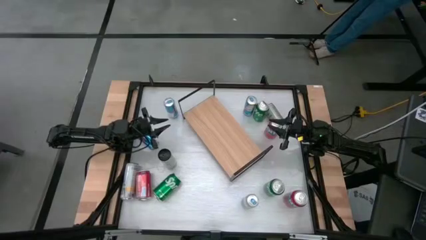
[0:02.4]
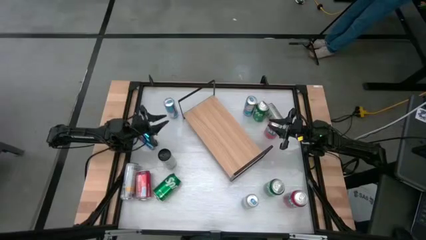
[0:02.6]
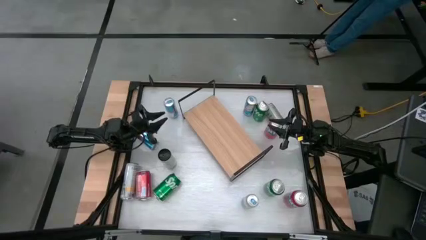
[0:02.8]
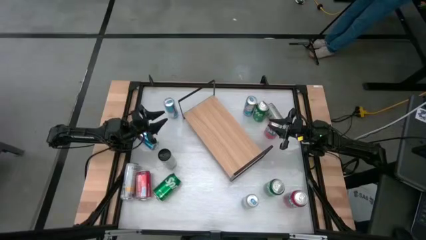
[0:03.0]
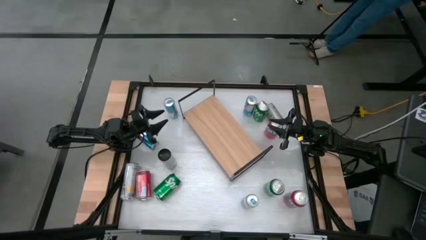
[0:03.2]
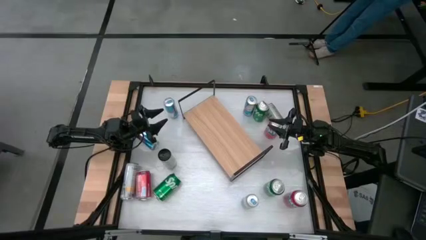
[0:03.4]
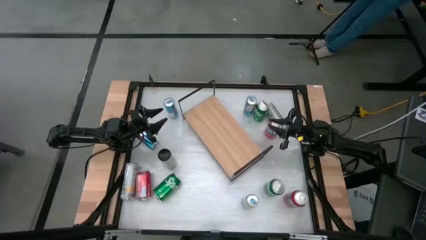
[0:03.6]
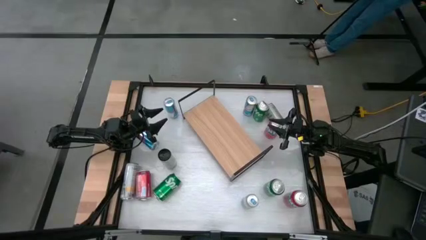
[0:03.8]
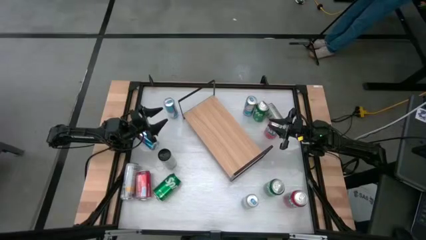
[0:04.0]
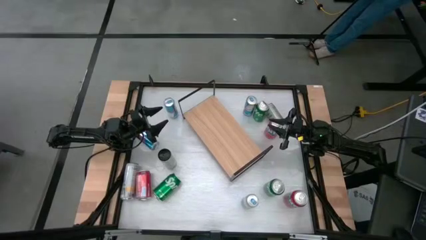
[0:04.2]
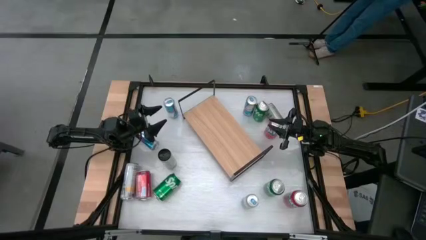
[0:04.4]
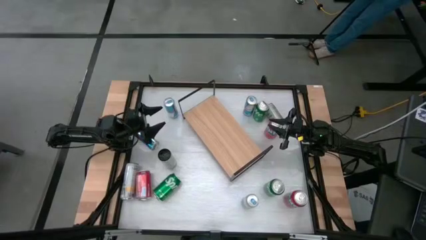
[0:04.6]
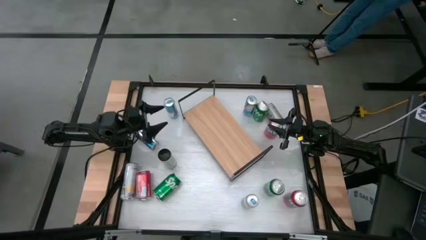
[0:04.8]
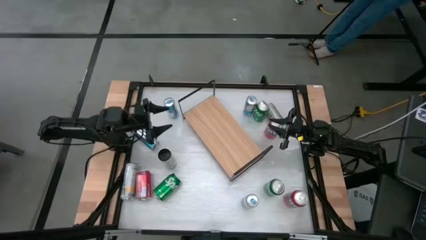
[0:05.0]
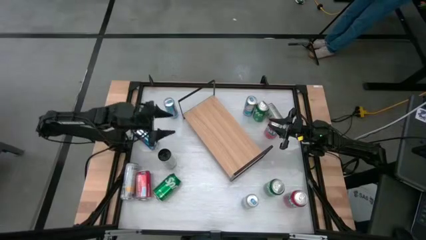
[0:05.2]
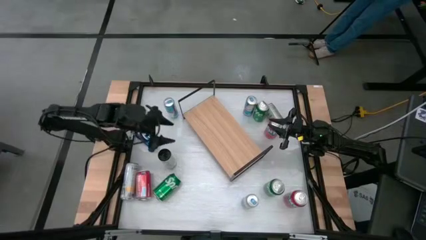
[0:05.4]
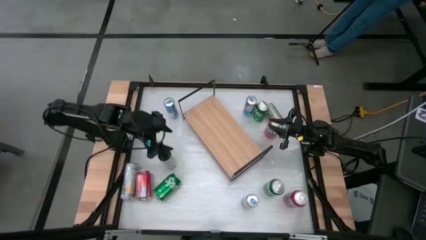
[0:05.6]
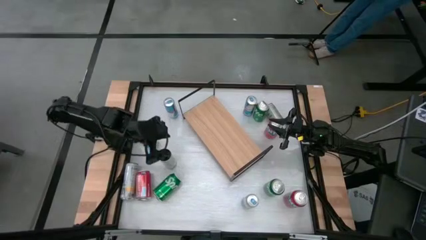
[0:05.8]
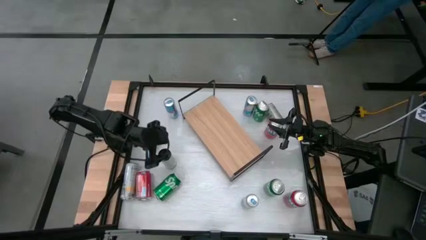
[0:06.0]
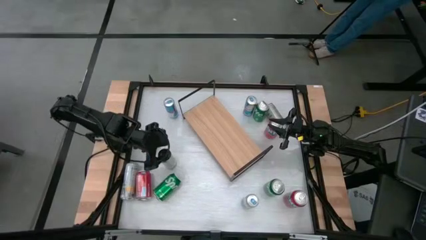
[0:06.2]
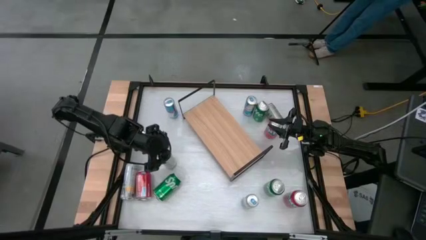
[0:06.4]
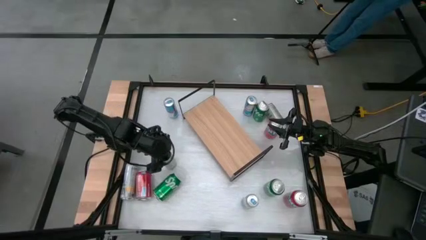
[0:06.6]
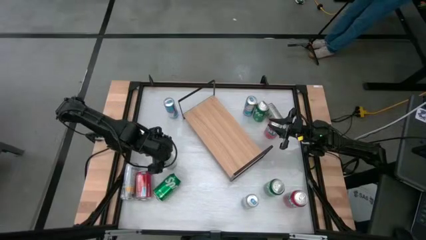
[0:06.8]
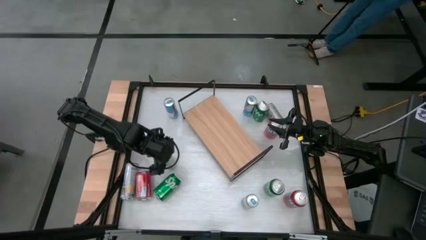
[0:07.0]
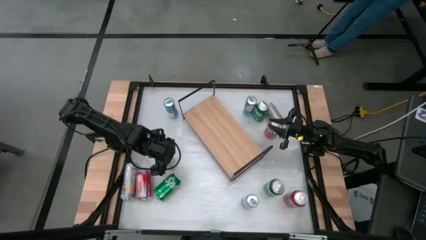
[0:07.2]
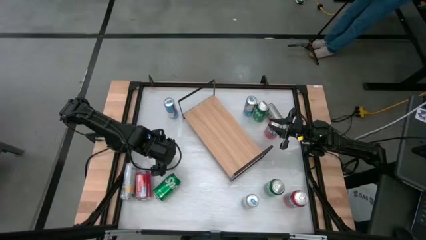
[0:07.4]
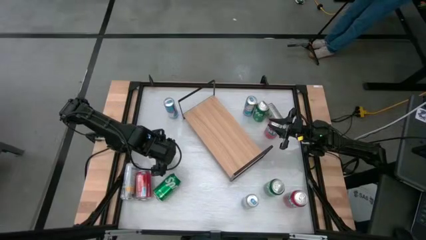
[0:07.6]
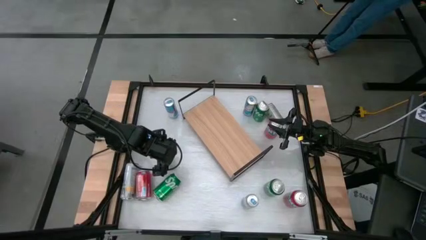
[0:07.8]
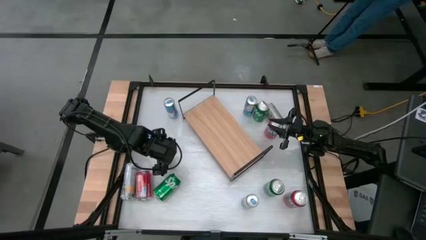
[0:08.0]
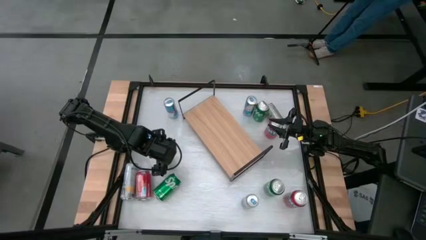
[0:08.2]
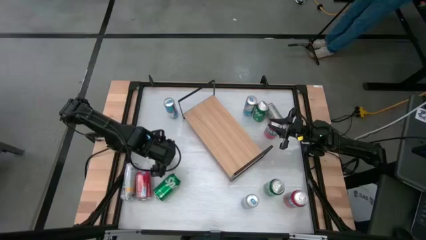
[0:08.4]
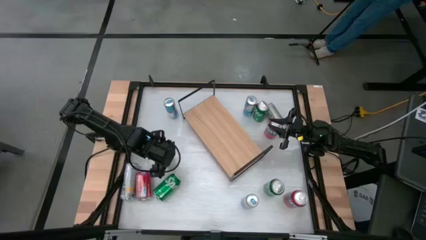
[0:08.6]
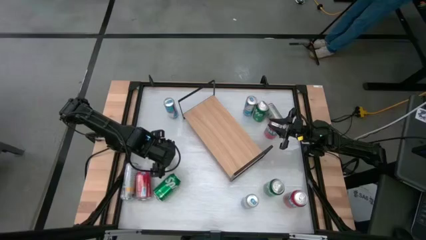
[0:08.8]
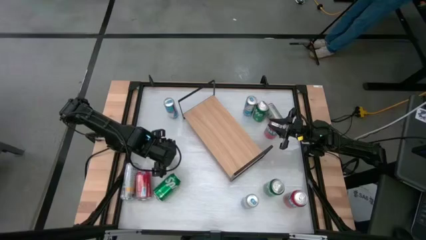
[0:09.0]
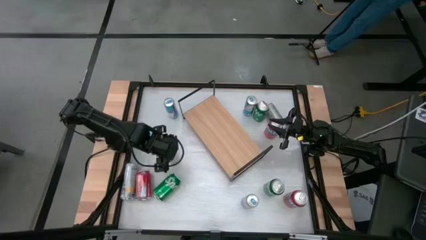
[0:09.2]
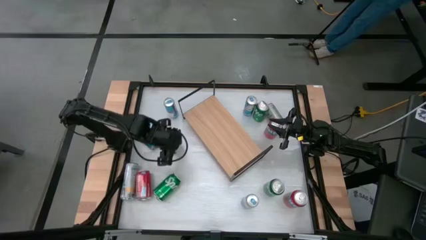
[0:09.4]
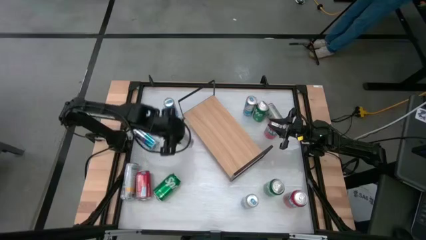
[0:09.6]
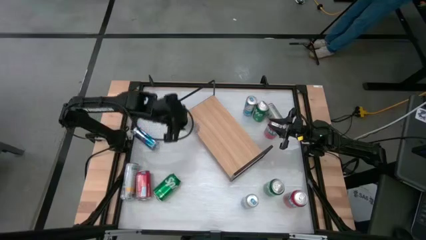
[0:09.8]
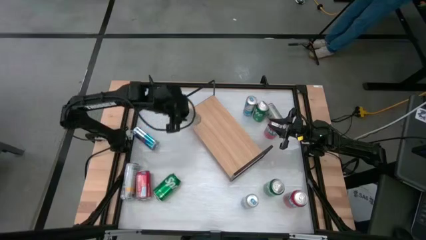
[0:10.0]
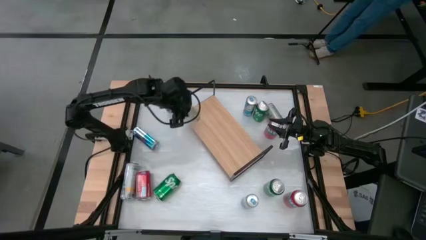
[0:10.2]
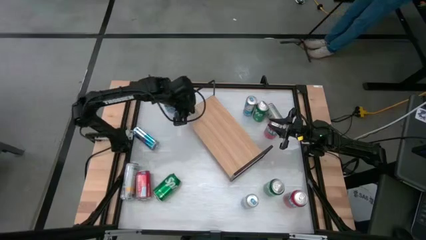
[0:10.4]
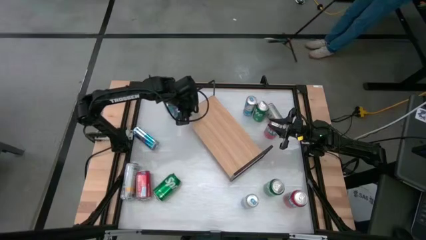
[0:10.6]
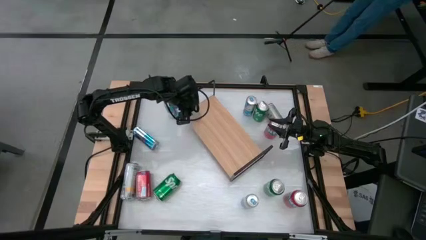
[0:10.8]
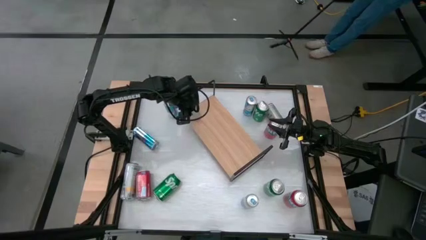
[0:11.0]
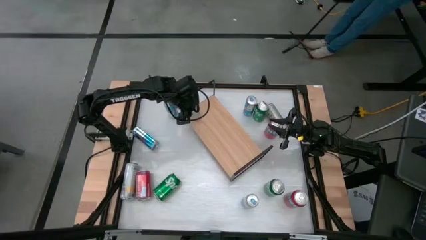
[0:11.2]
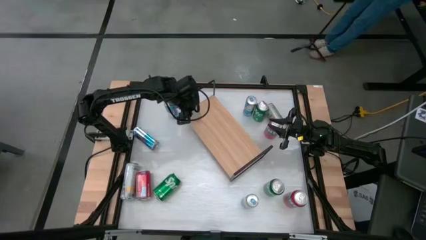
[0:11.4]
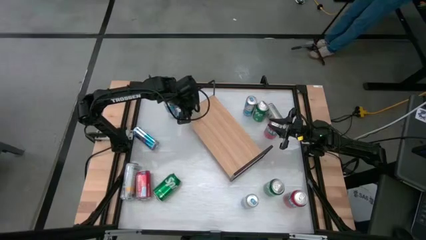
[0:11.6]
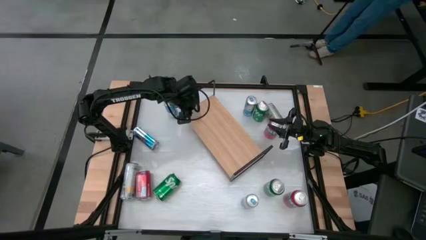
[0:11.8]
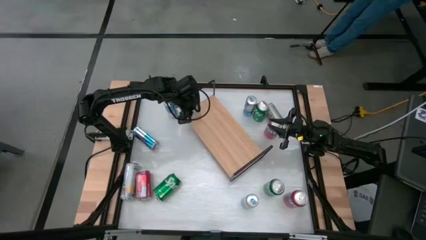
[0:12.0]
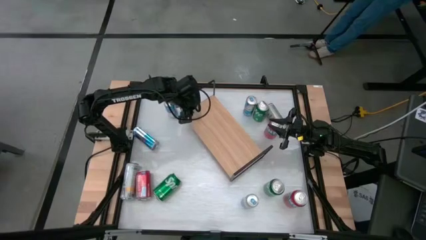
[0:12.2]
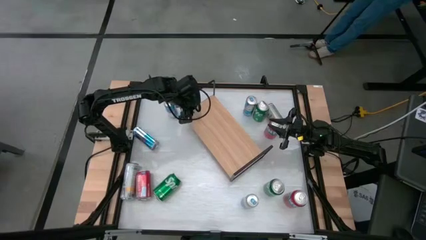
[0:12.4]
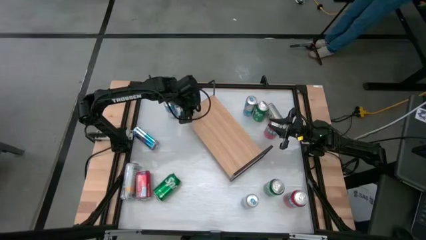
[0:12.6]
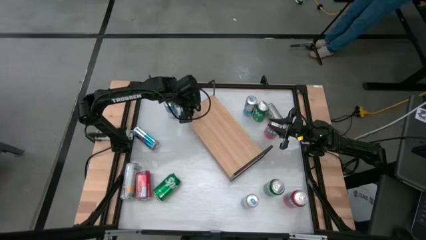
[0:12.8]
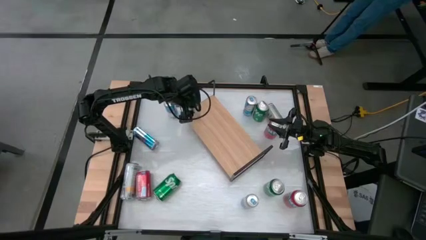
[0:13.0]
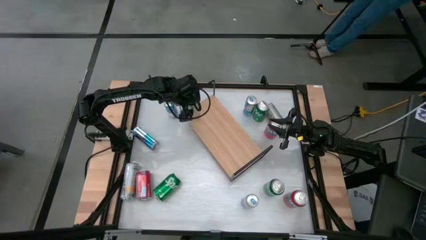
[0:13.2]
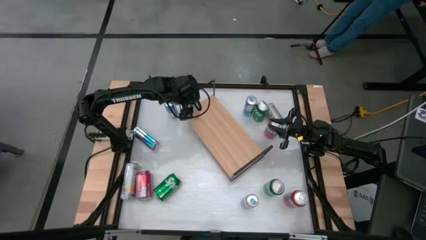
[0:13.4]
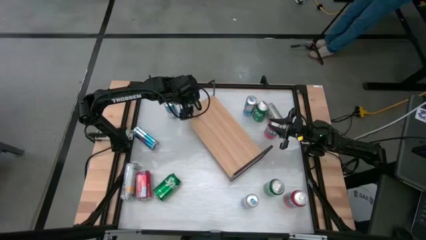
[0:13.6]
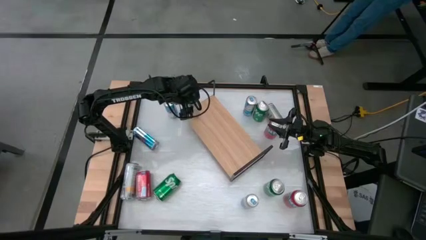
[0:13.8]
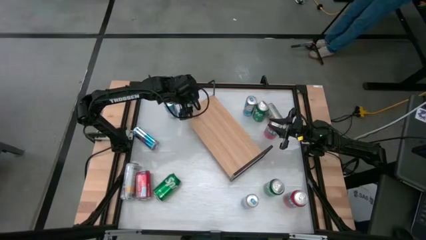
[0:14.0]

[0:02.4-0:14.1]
Task: Place canned beverage on shelf
Put the middle white yellow soda can on the shelf
